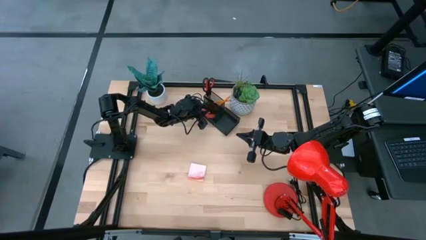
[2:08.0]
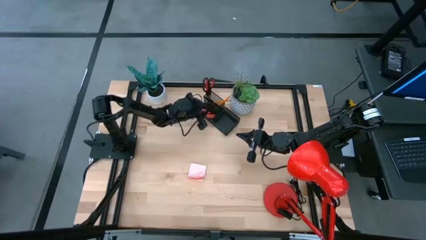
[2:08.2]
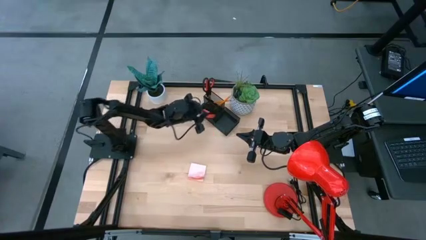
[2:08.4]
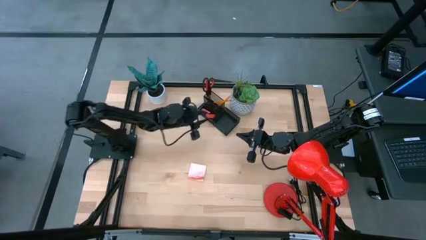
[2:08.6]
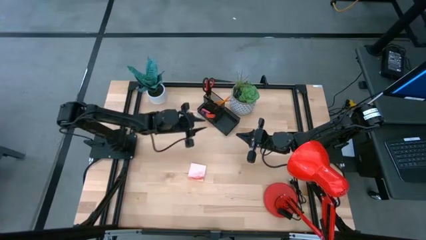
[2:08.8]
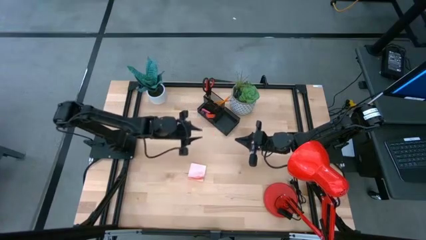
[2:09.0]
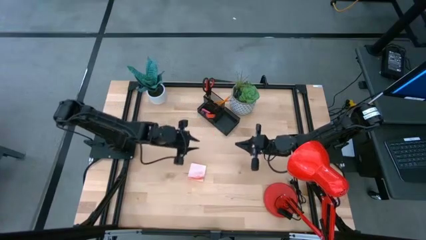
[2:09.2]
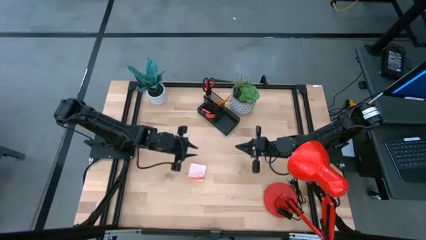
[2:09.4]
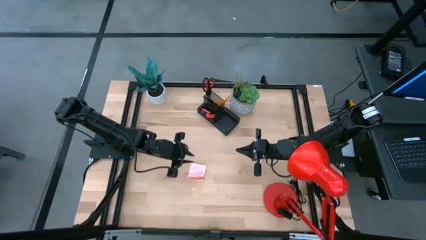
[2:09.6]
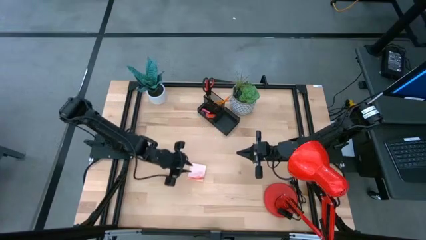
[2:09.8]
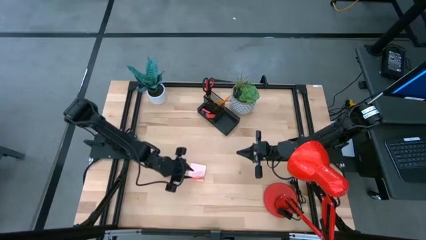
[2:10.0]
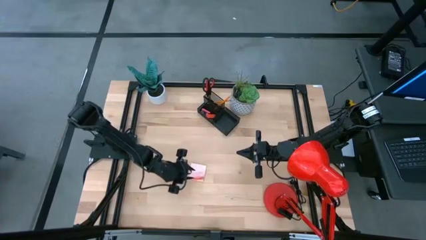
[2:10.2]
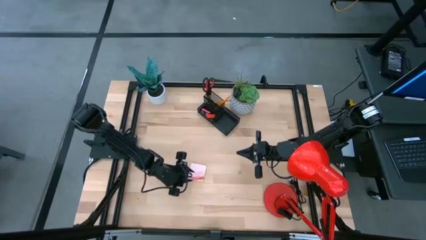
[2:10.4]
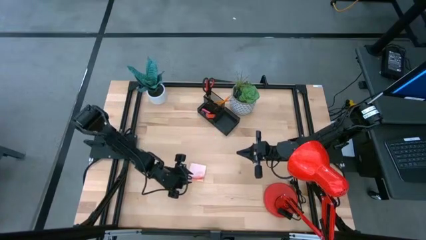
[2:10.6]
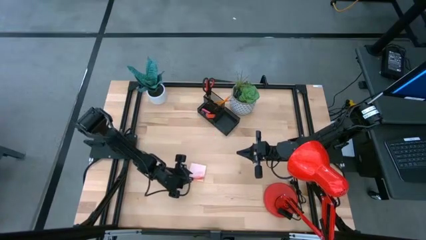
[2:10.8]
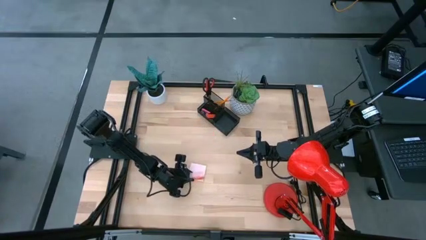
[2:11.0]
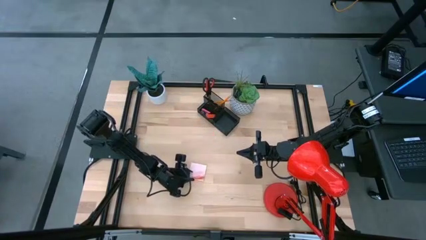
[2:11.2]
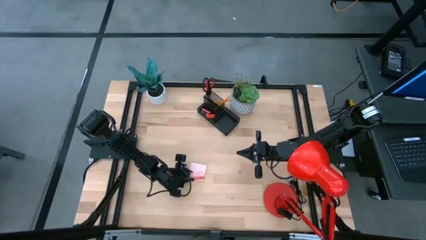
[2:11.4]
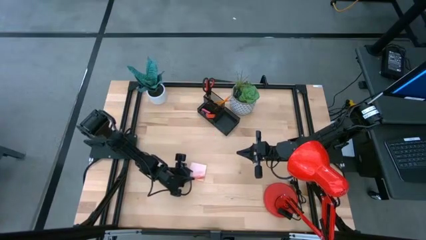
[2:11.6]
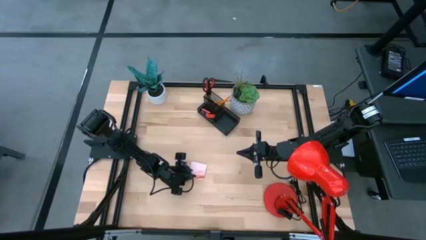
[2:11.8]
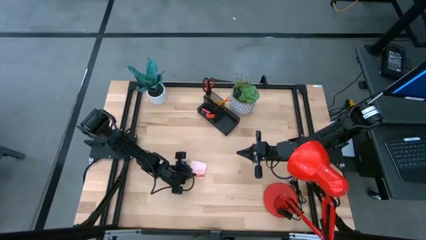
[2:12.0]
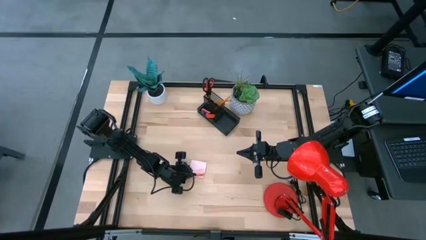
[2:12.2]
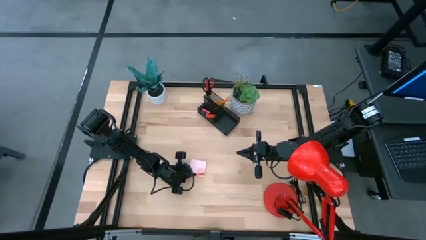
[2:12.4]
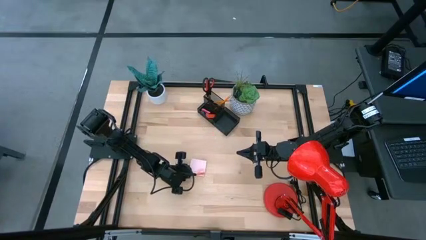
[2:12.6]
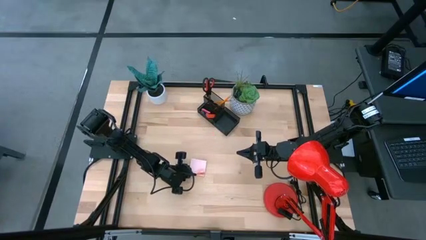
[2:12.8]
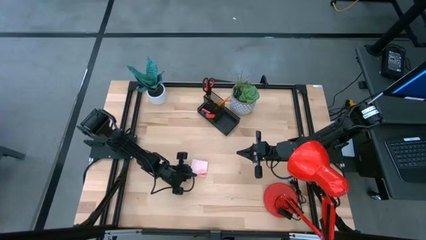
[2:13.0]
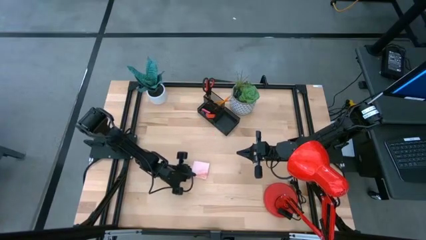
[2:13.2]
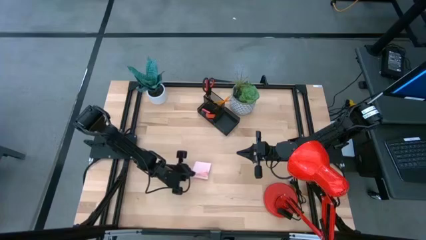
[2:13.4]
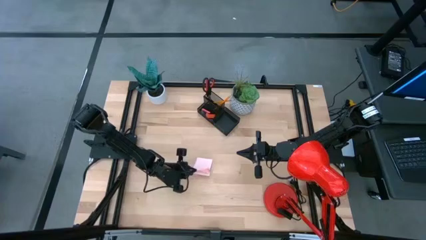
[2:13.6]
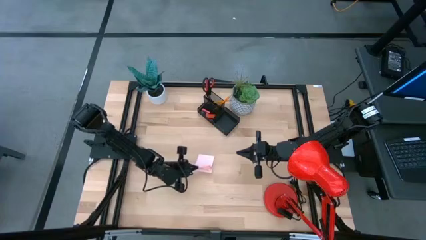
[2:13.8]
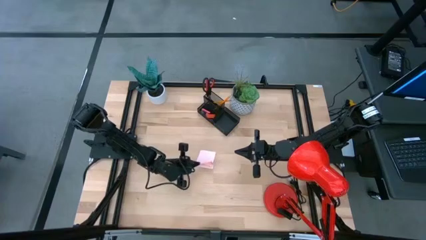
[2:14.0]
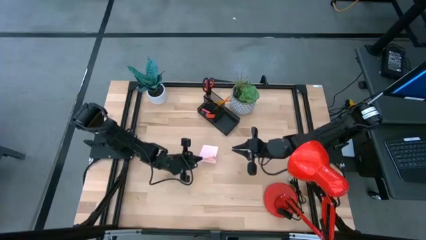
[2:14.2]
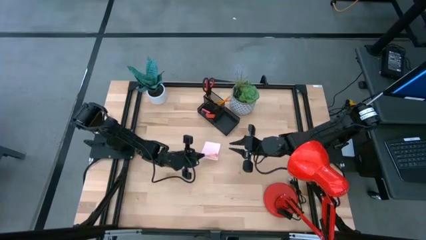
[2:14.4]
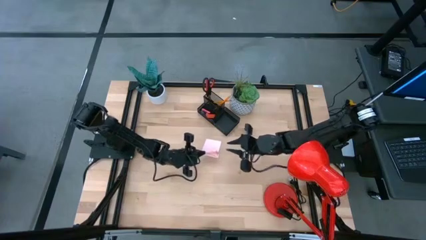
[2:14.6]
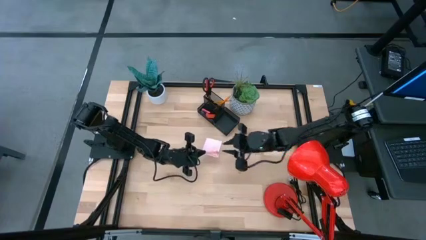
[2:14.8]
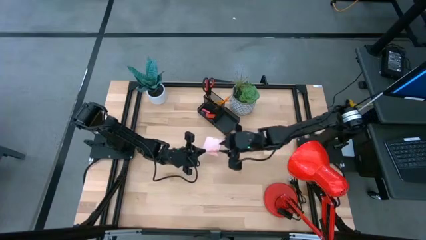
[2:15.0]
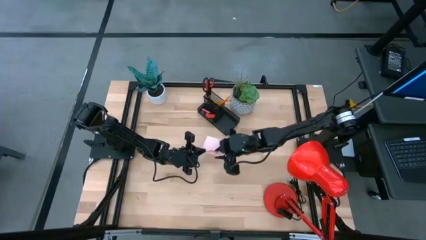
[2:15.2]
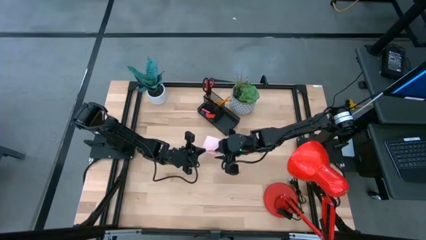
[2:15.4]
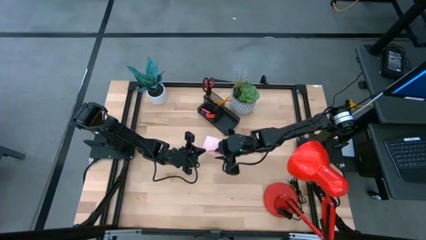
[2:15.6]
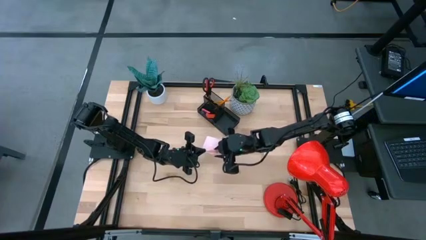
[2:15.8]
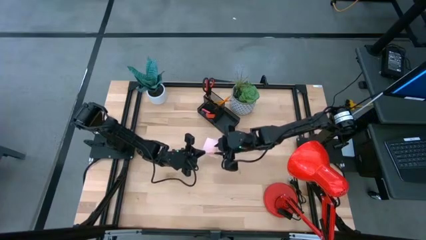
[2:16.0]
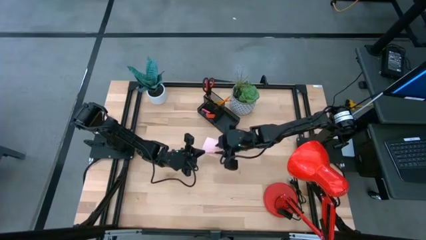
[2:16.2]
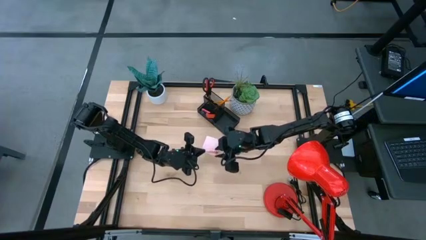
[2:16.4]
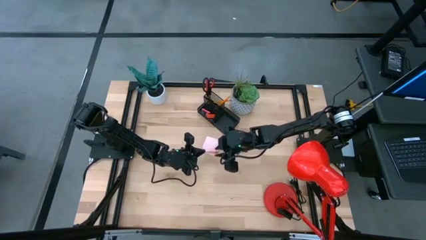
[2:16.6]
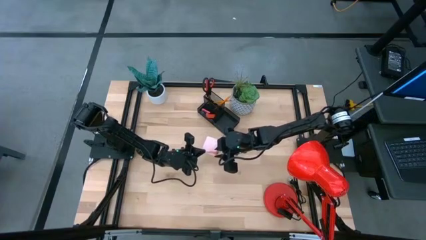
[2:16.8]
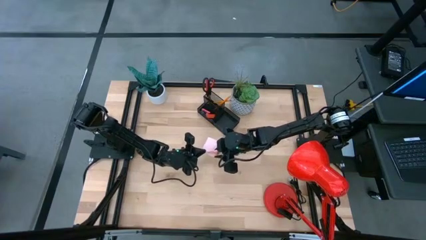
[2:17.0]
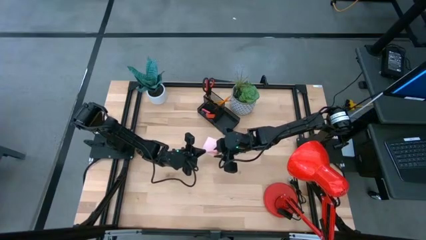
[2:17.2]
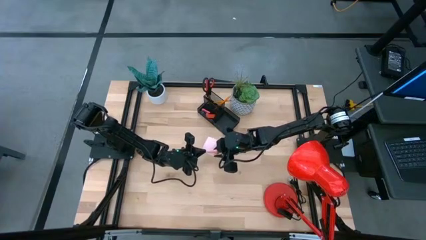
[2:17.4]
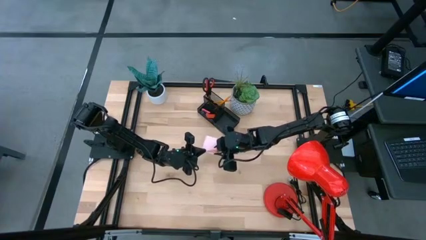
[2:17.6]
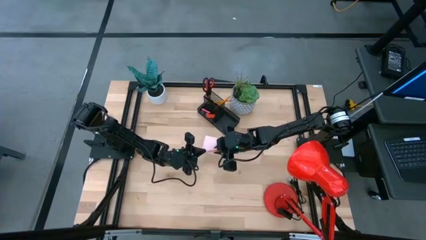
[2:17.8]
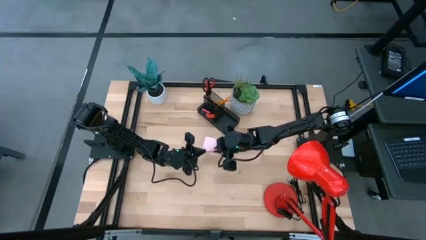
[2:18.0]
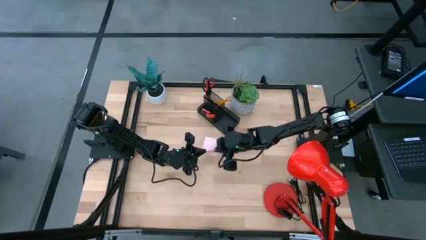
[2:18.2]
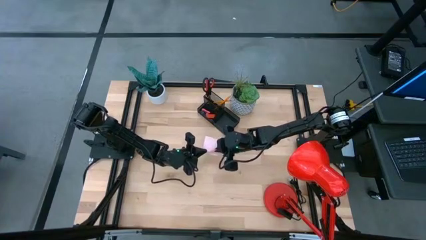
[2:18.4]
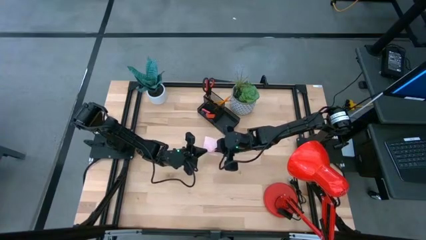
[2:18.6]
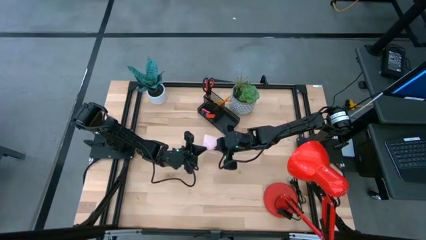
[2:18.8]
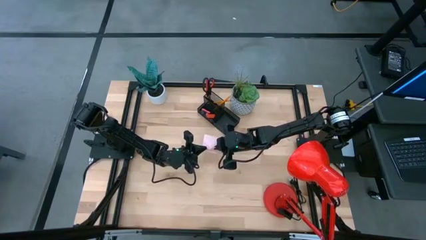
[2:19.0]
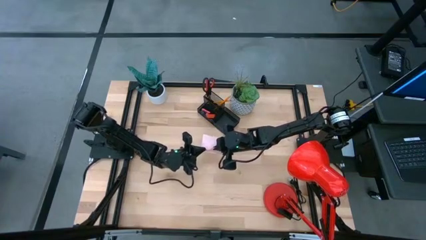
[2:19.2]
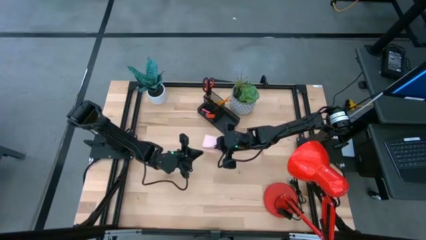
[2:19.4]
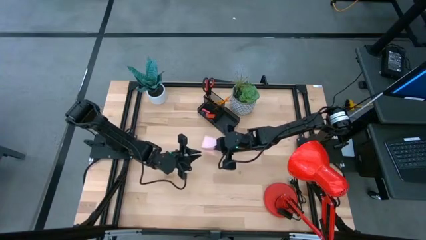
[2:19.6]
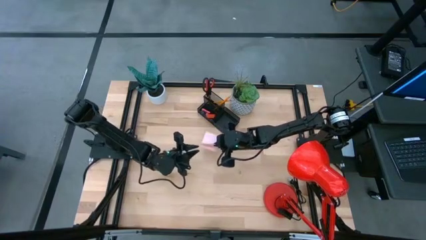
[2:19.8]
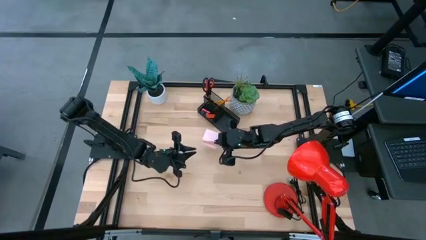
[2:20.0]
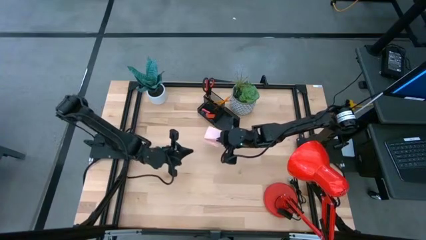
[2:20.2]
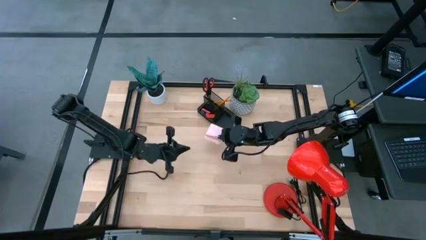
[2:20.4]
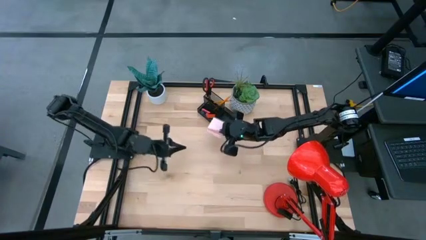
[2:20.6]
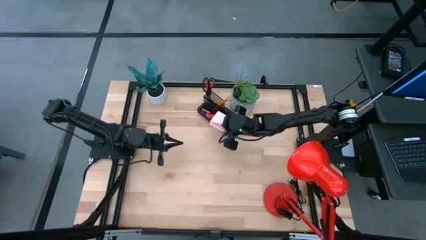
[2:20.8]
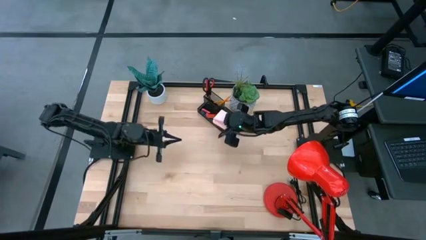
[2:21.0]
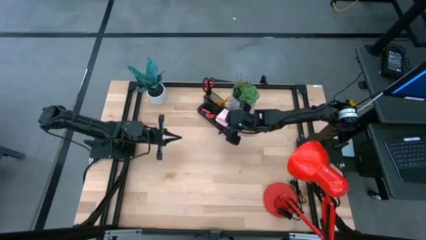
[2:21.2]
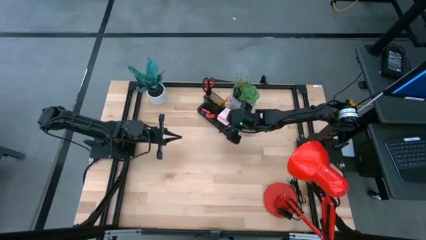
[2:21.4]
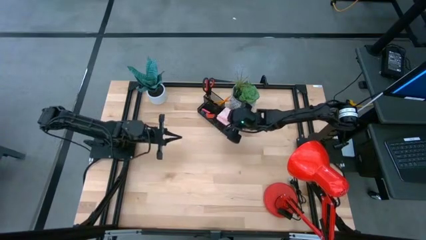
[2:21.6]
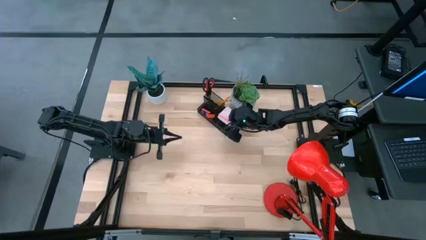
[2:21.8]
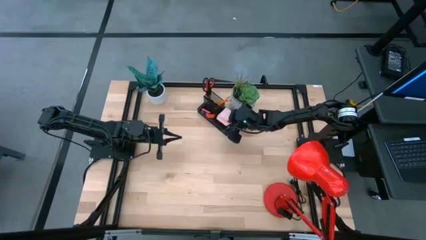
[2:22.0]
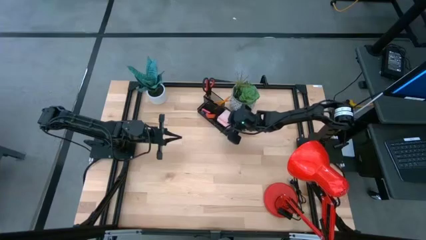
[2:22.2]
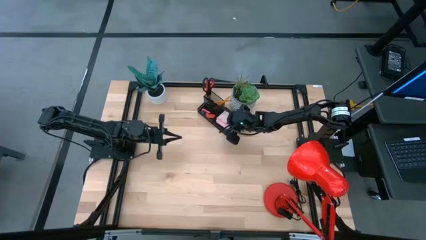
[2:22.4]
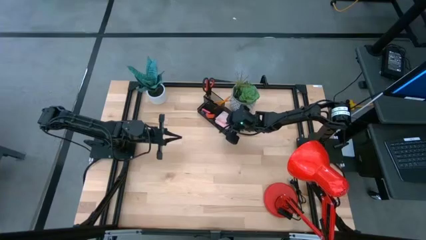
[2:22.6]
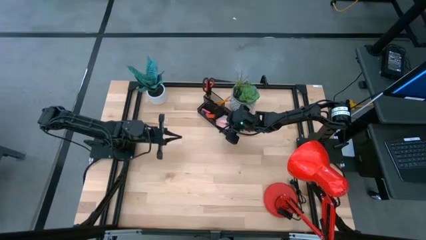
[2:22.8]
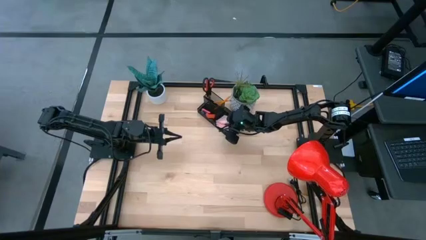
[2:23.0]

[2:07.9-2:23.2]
Task: Pick and place office supplies into organizer
Put the pink sticky notes into the black desk organizer
